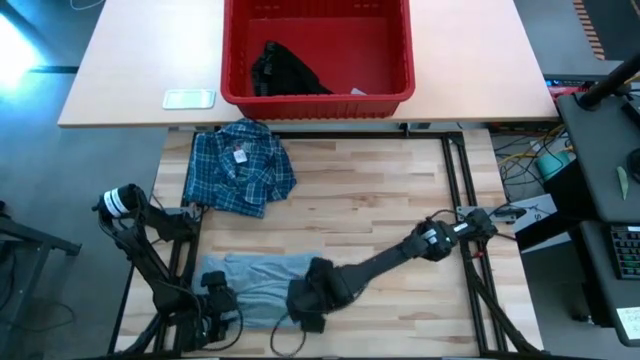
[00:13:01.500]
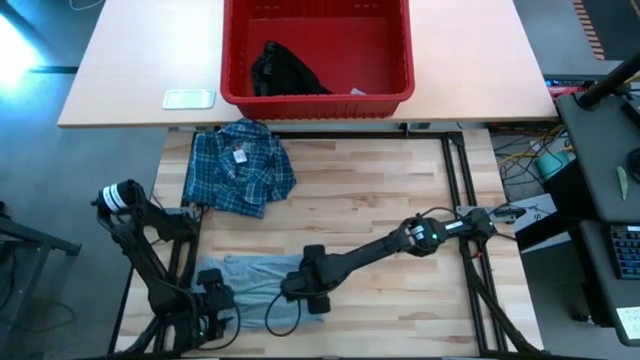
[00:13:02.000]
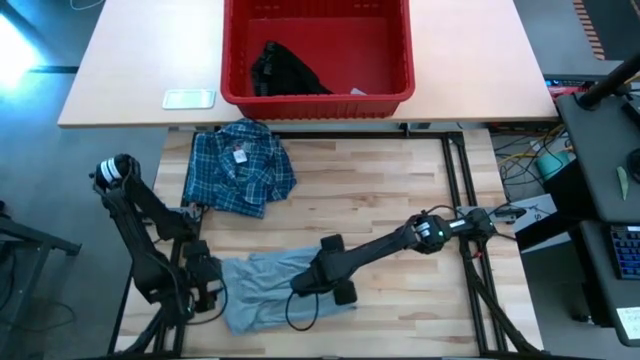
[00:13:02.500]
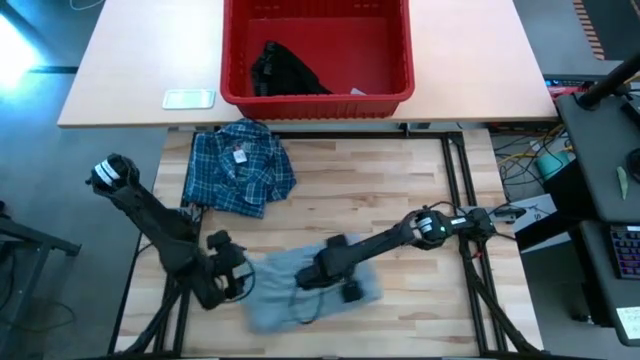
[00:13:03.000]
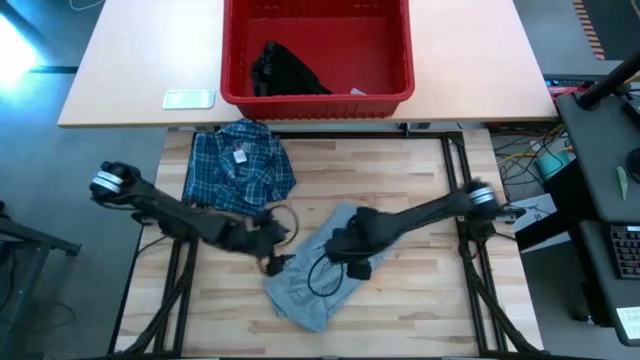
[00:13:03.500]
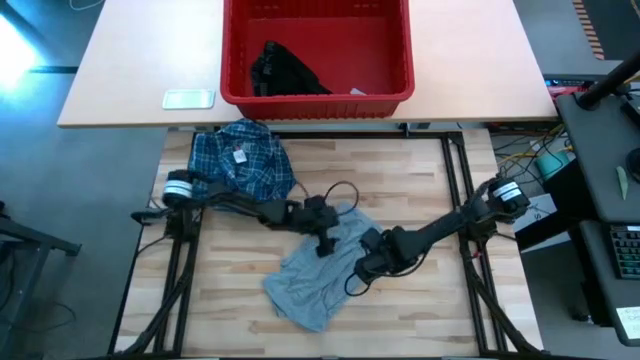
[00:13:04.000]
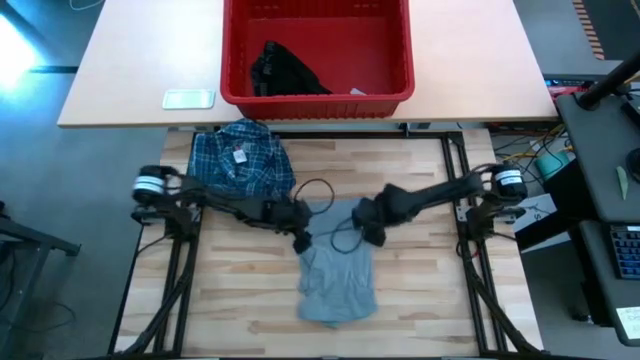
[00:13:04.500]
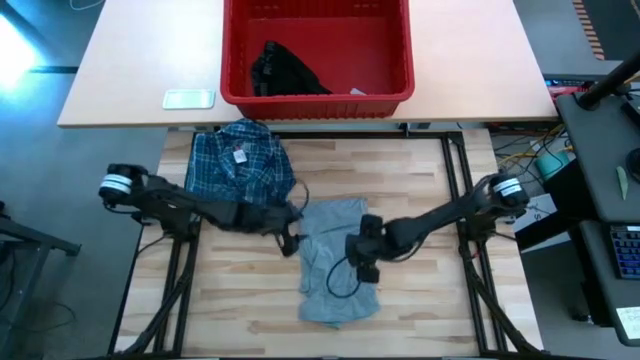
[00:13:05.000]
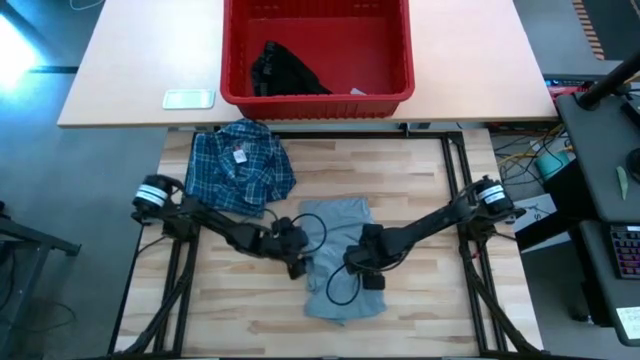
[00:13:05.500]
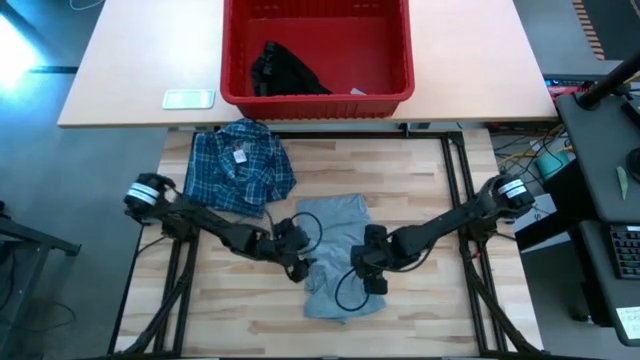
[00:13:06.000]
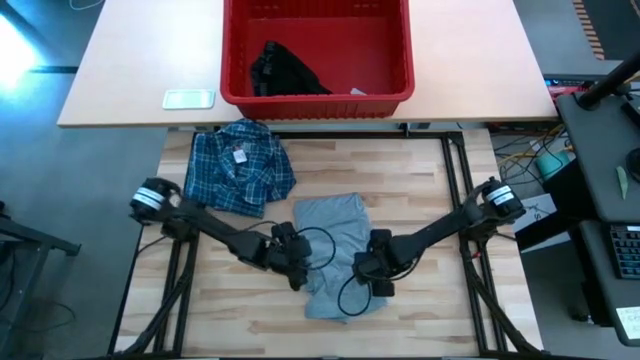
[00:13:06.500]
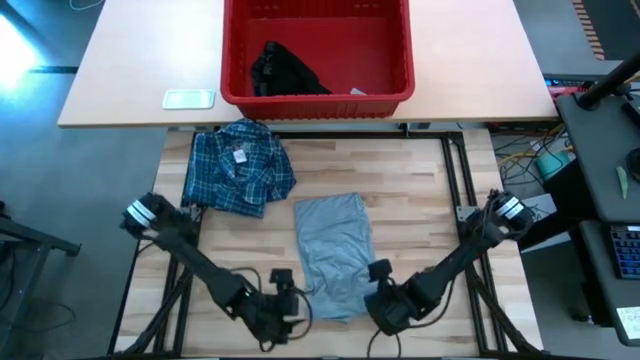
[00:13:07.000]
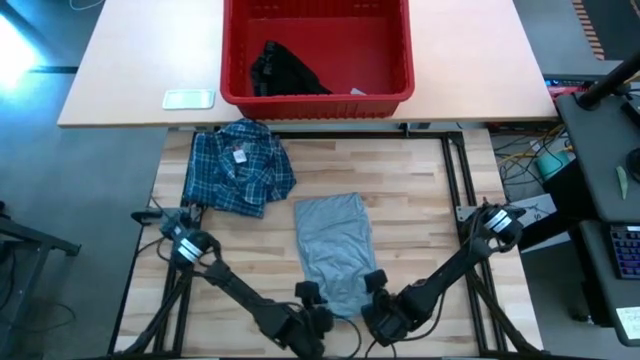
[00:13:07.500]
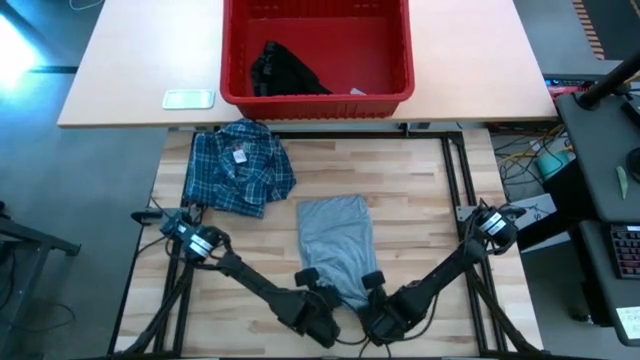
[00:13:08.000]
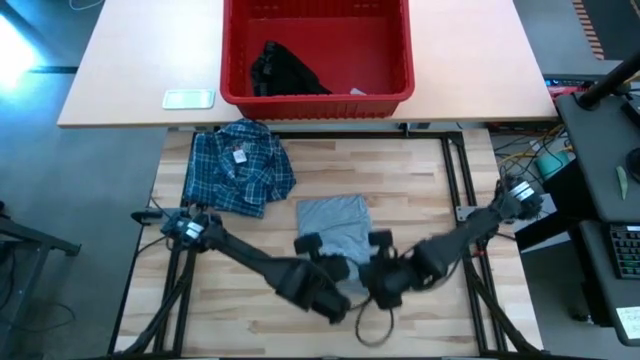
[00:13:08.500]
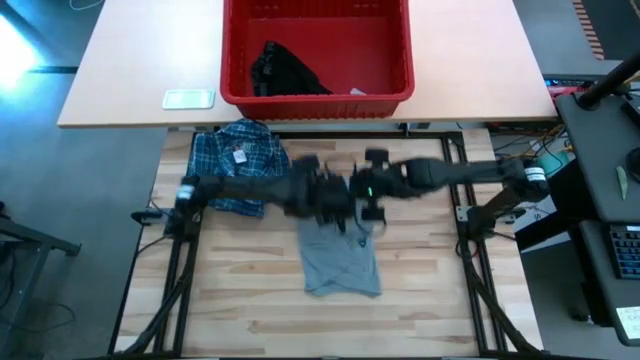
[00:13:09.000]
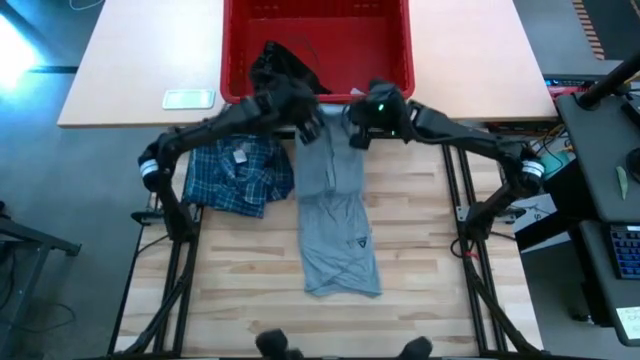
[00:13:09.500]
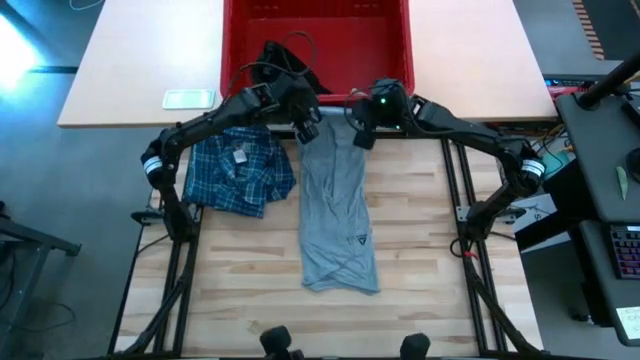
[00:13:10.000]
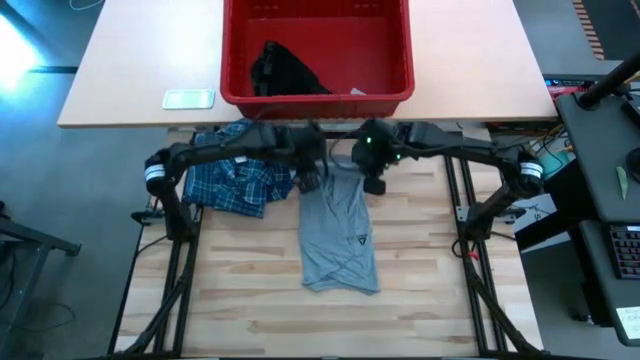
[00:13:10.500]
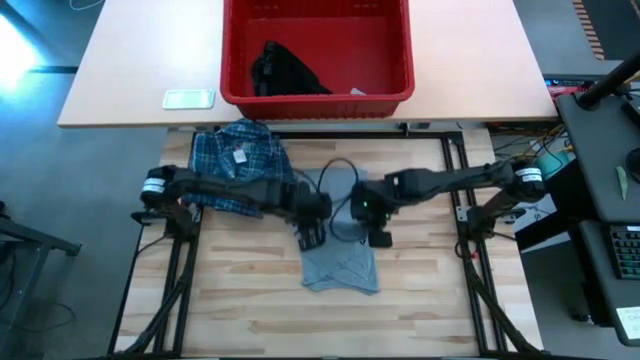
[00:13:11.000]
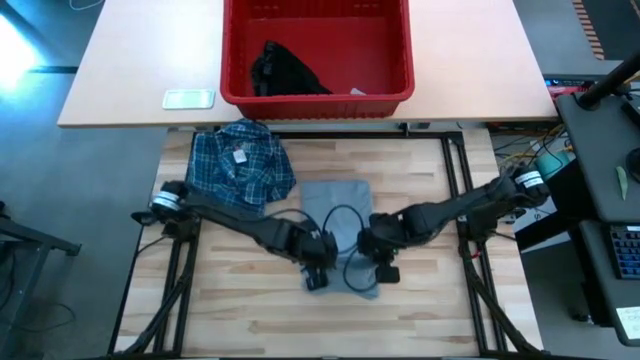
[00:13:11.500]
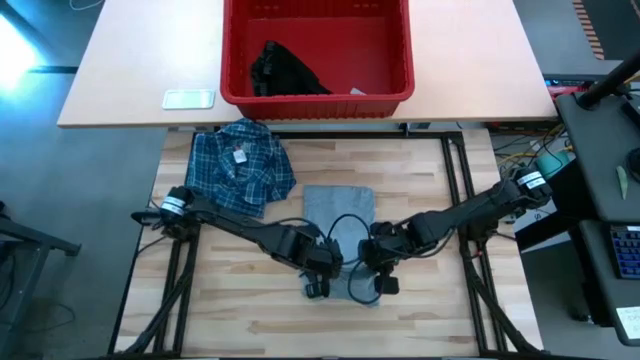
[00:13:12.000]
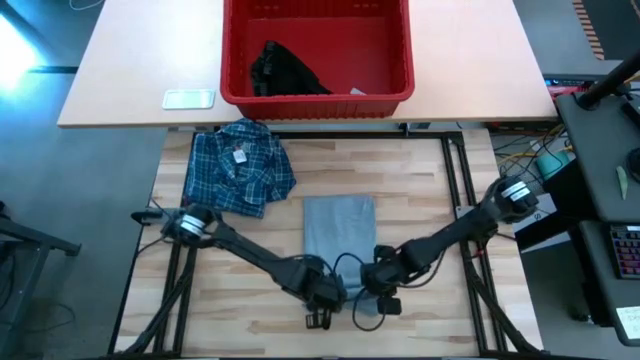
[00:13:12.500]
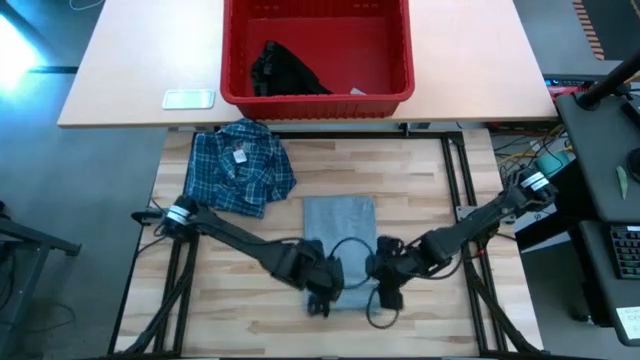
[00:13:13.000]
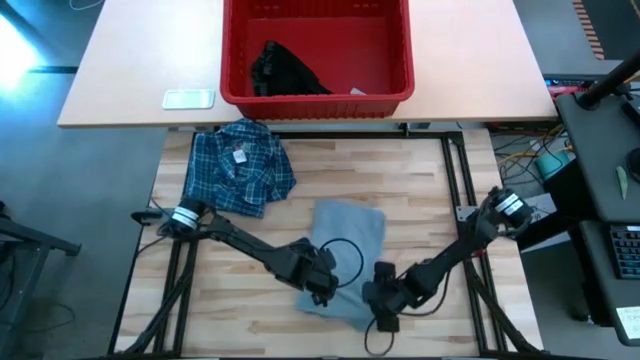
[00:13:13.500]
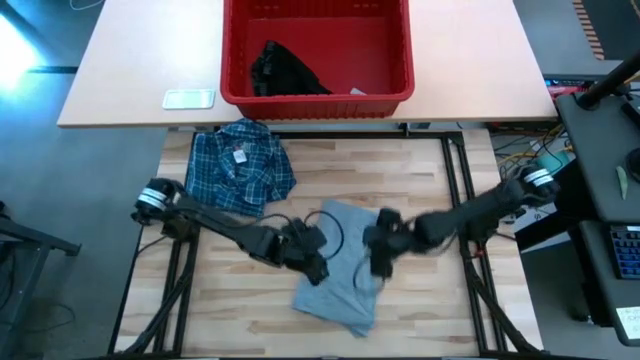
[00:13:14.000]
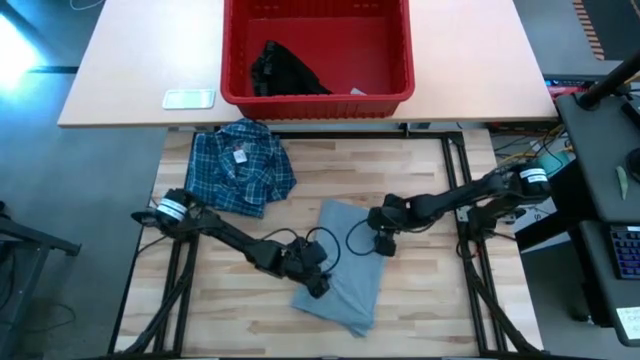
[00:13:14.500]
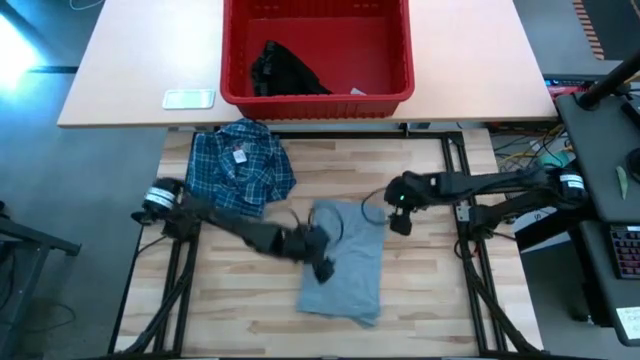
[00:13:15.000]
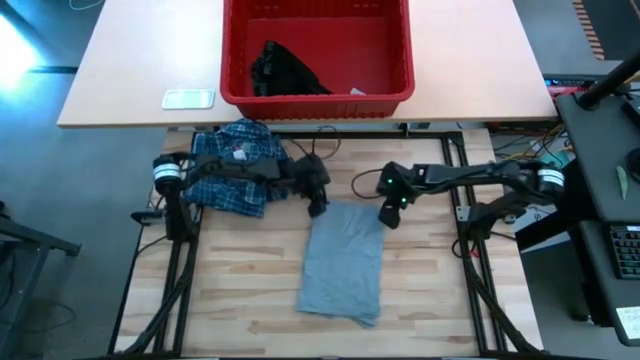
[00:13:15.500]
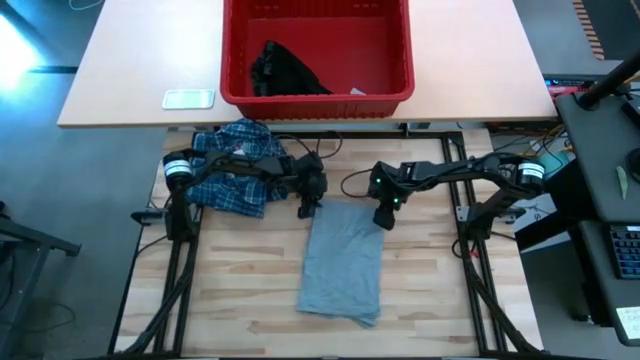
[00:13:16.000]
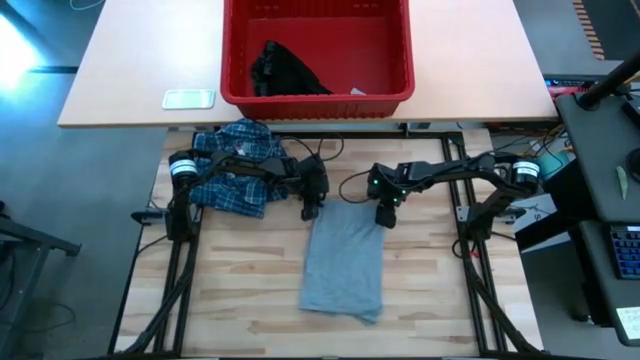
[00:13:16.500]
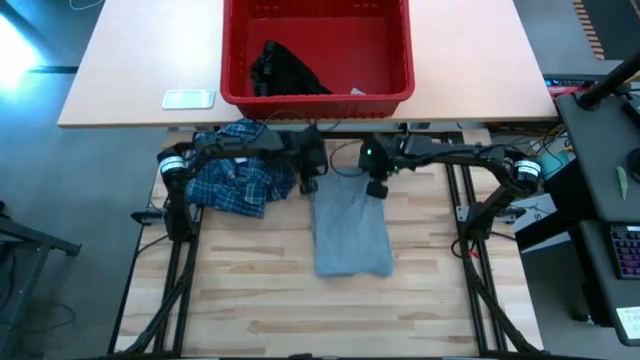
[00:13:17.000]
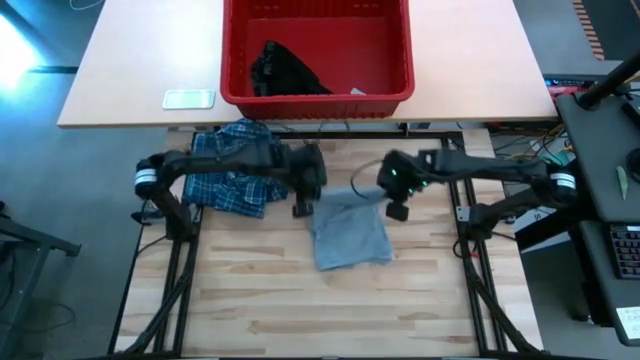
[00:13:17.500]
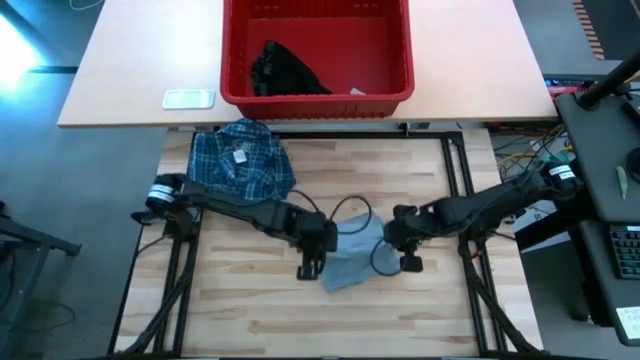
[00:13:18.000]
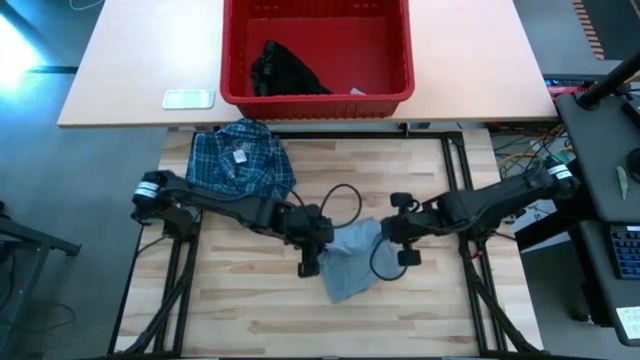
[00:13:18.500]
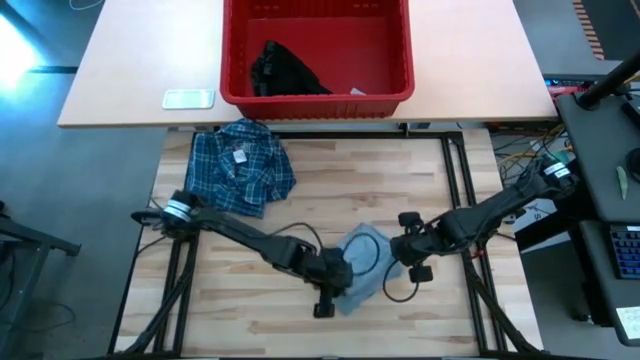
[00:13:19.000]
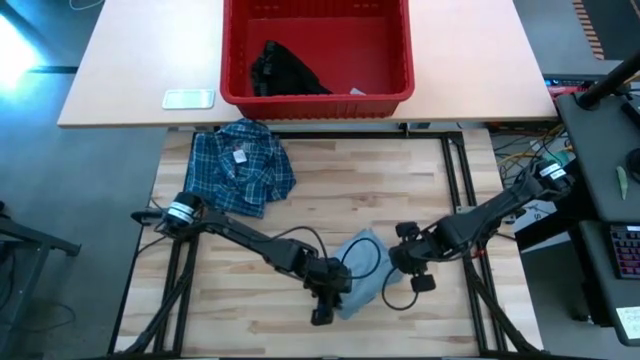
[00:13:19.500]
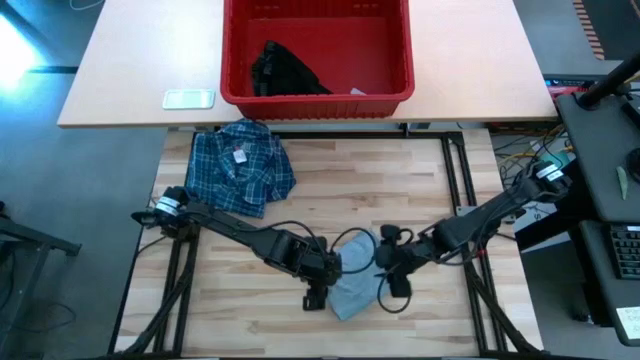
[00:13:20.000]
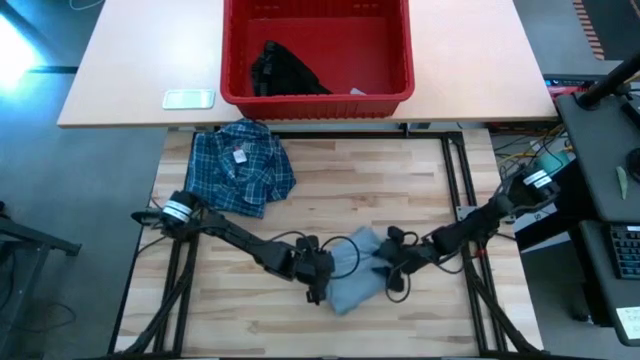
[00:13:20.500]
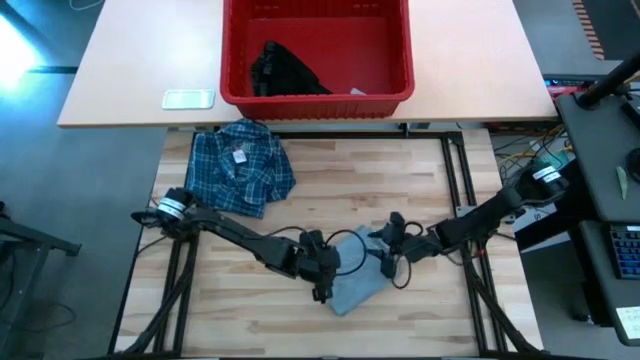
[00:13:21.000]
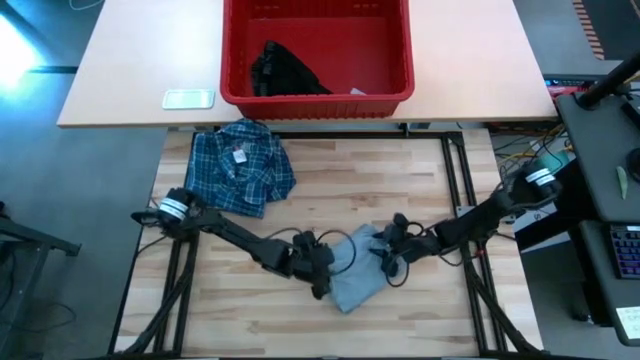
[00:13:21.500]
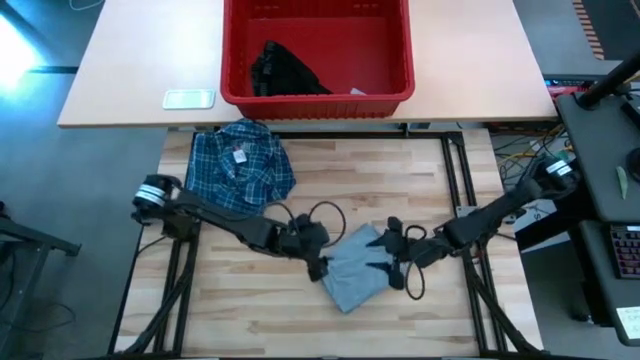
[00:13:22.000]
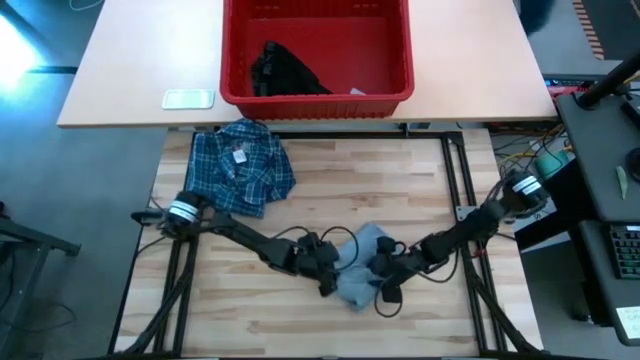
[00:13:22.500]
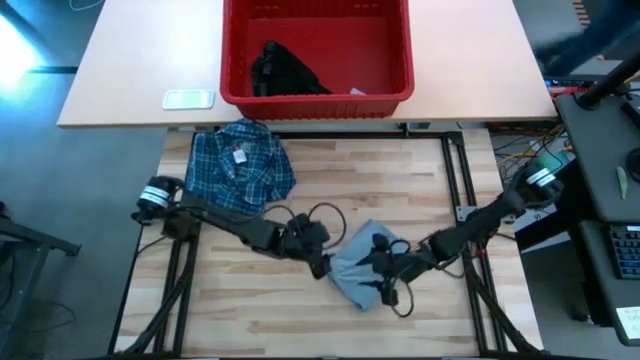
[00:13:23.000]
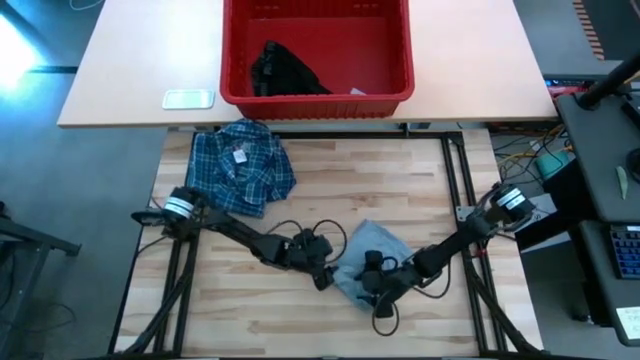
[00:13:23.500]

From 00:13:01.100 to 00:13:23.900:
Task: Fold Laundry from Bin
Fold the gray shirt
